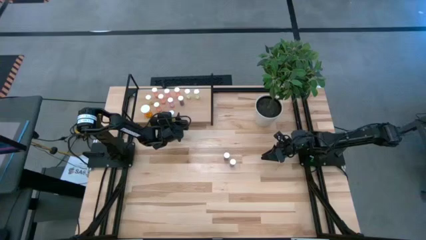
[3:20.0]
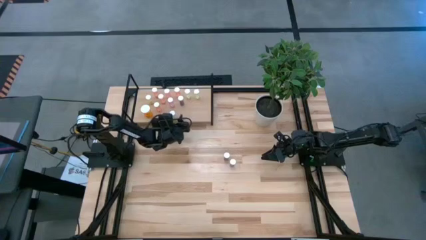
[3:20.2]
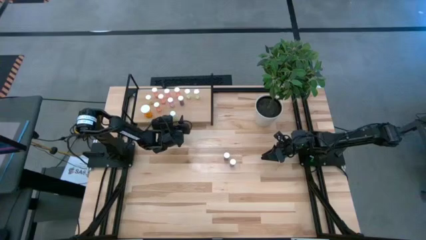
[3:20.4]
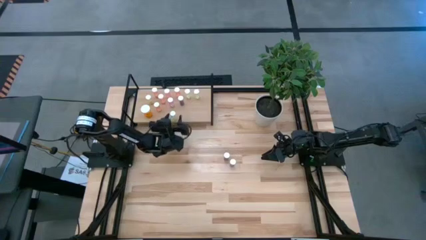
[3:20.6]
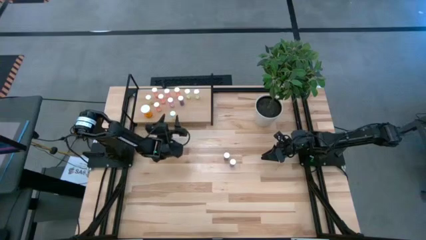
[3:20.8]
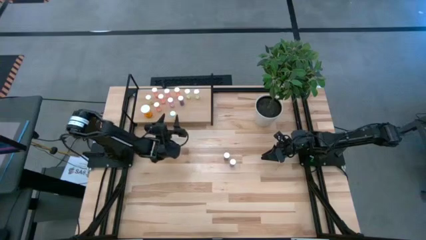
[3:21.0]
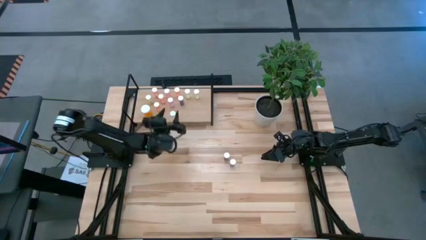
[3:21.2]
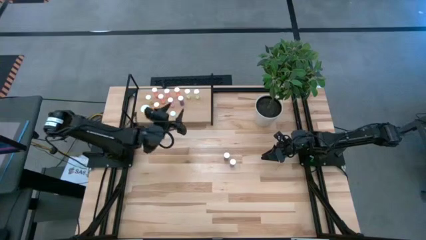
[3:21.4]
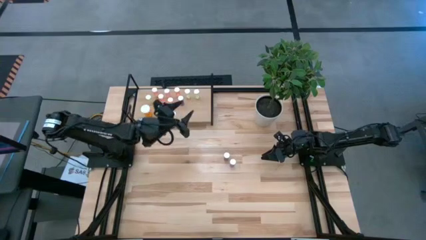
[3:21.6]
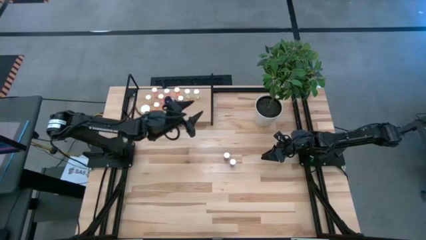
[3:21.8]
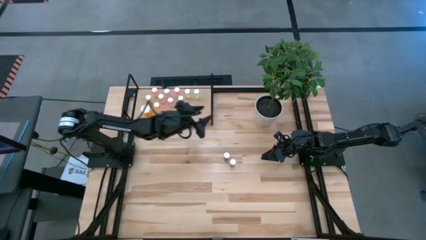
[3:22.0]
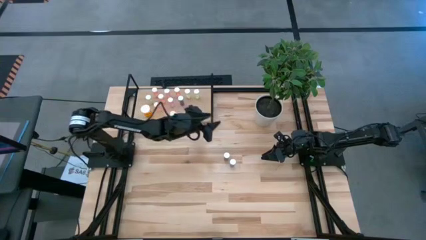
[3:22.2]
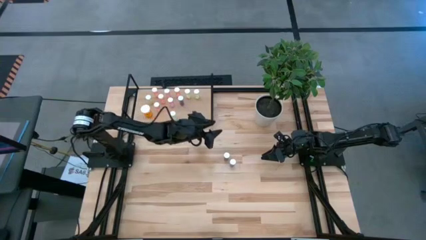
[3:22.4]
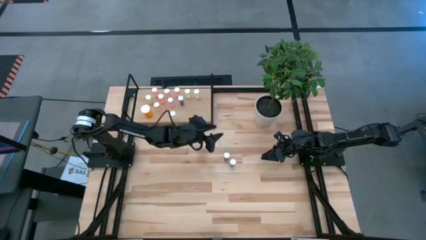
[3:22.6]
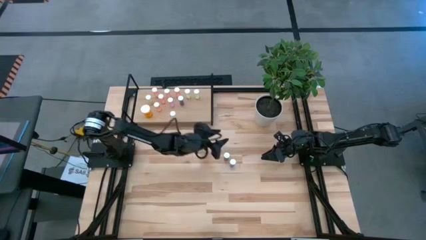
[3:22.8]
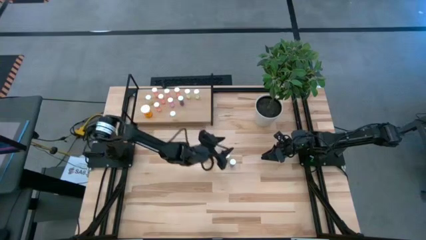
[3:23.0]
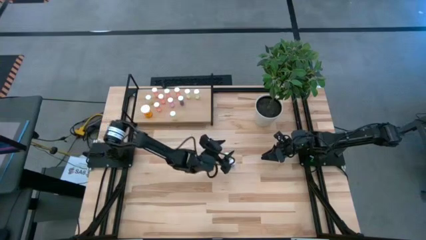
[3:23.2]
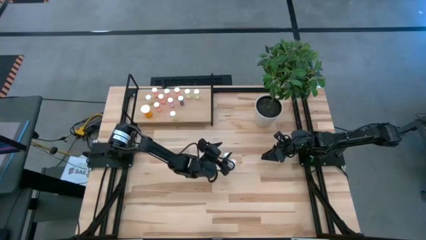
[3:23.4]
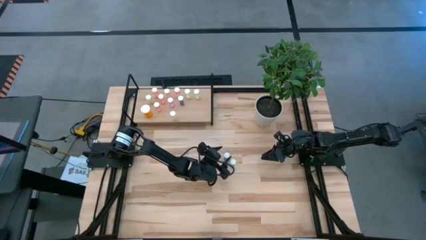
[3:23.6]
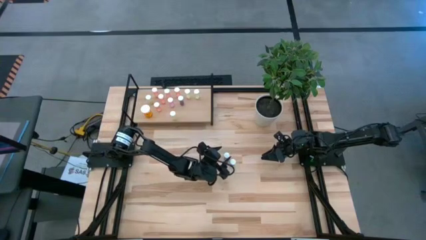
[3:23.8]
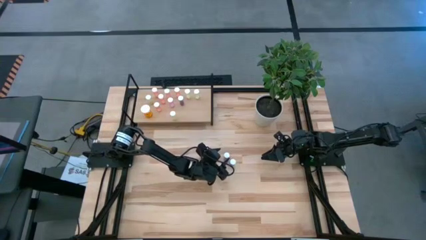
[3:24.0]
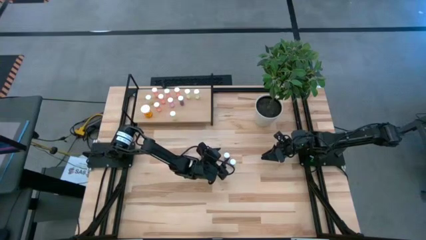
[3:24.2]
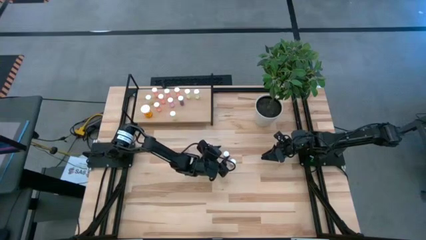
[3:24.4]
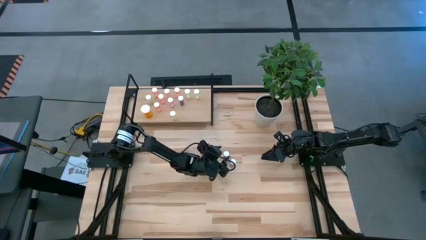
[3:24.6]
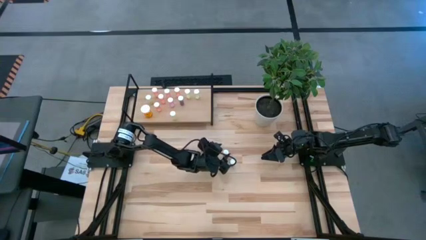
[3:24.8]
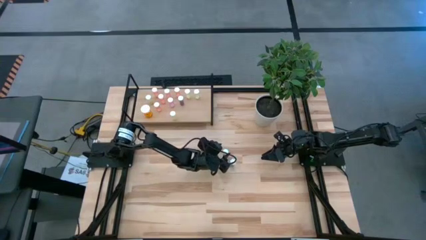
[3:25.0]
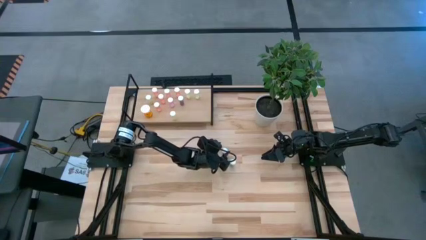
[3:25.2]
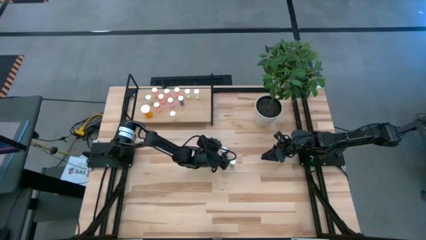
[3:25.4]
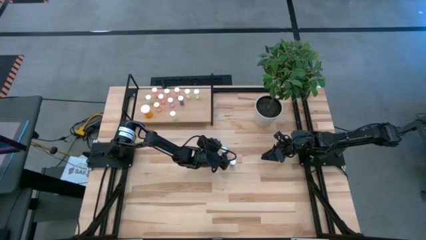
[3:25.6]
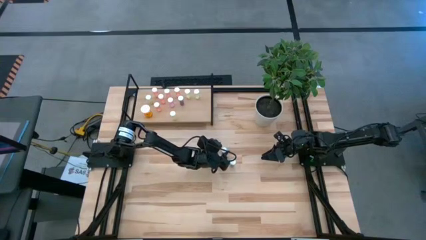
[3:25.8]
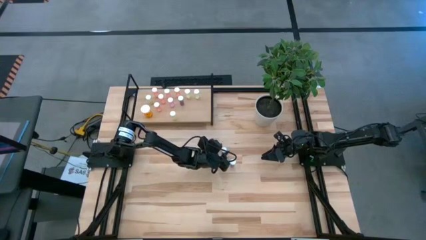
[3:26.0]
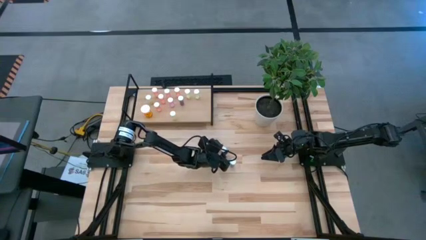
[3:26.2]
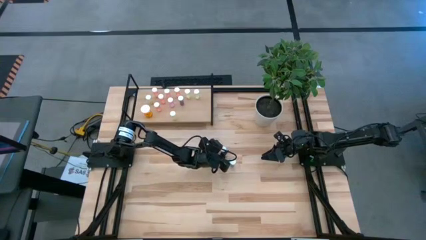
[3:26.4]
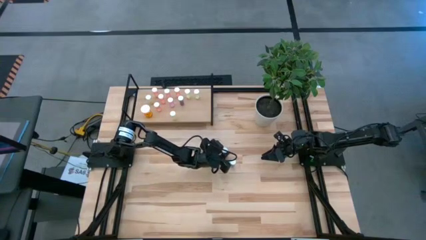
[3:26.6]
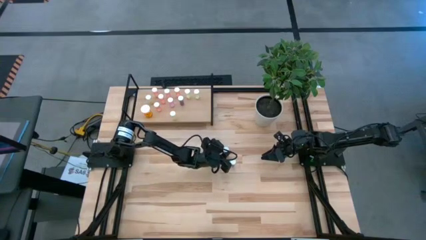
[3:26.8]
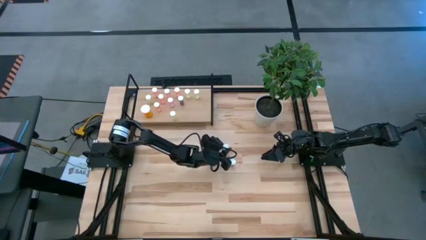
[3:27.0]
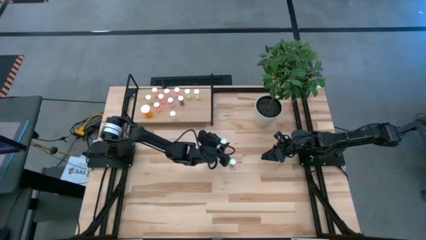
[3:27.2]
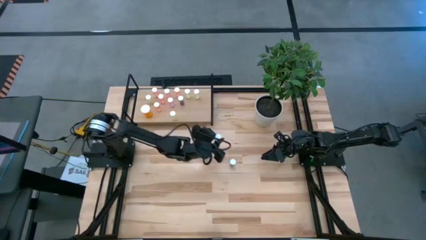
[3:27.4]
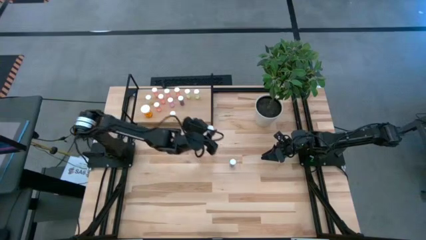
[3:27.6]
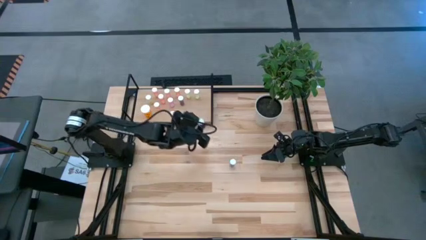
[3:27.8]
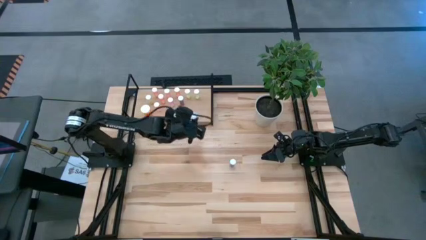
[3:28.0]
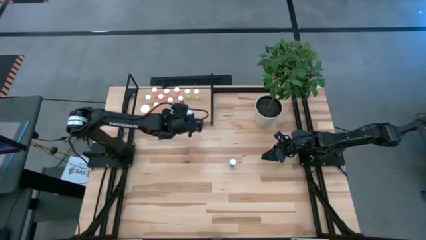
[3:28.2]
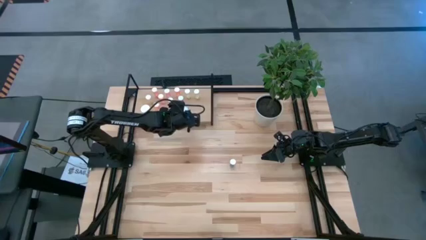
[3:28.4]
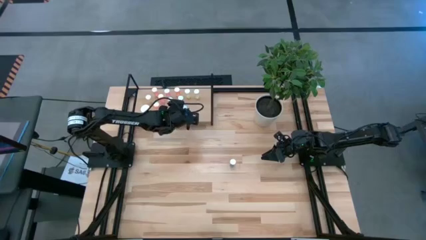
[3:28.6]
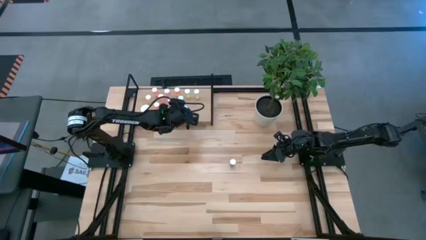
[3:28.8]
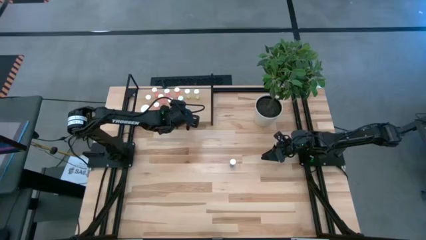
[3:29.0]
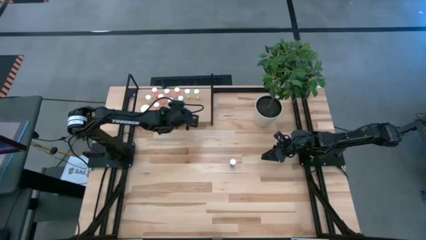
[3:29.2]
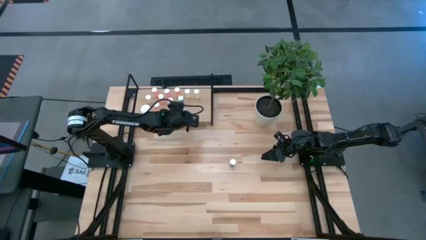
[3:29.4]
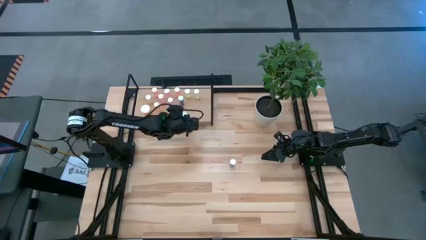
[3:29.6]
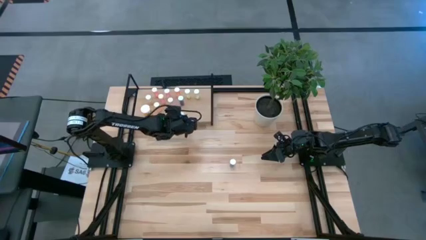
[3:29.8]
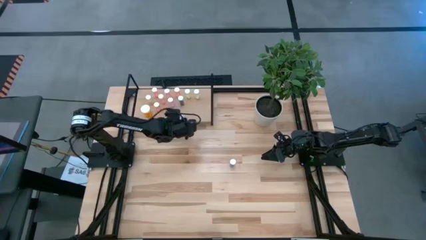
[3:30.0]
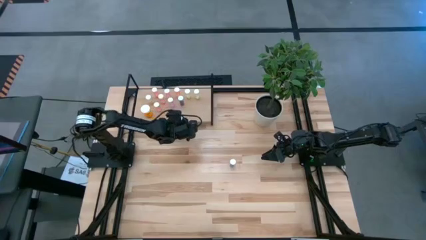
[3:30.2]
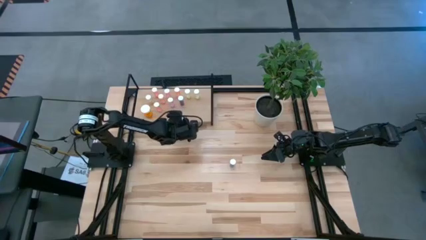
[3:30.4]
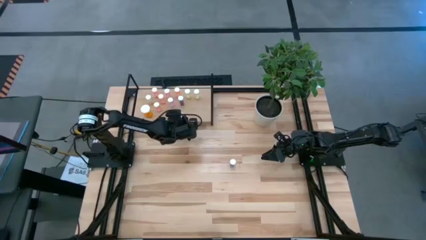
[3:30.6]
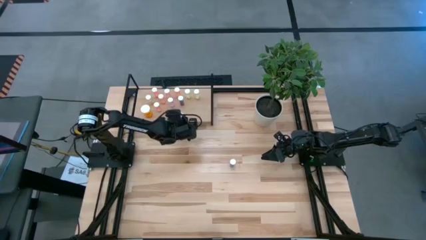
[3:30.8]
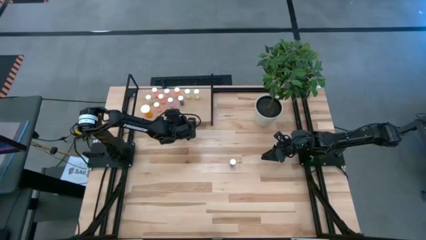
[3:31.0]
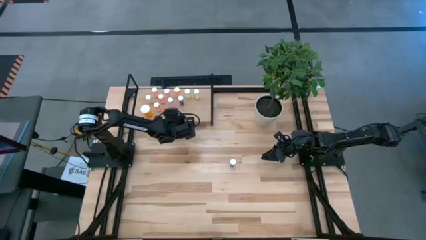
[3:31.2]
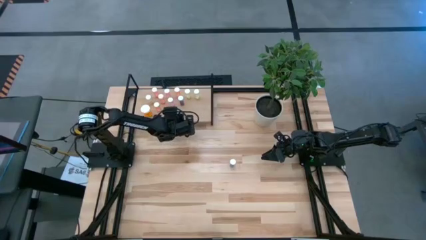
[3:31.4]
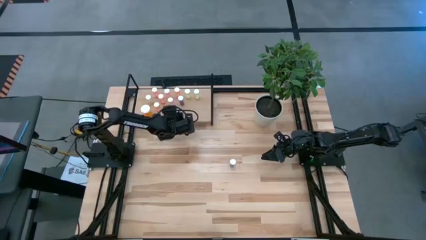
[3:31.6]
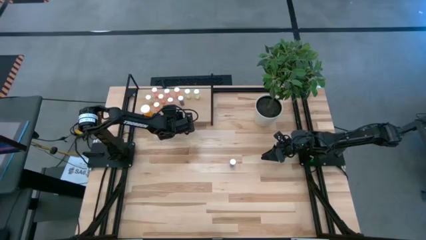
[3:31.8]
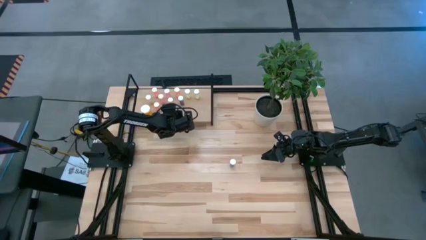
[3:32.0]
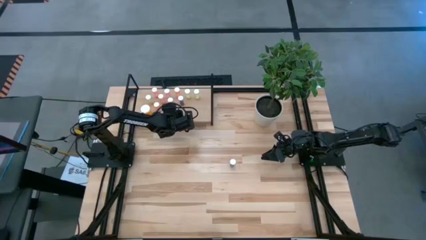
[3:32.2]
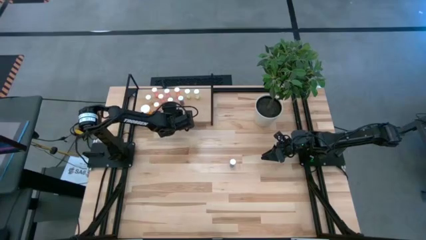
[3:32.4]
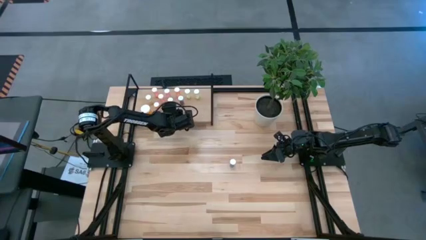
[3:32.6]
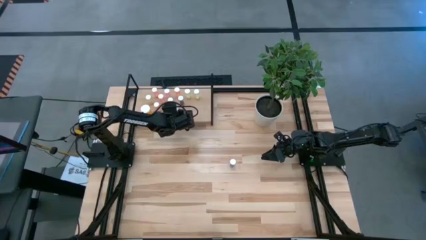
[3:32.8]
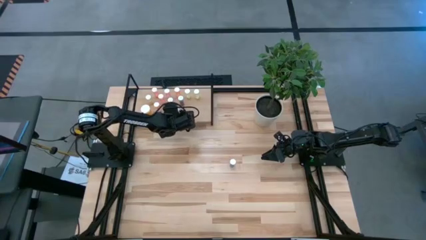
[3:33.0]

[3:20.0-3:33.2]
Task: Pick and place medicine bottles onto shelf by color
Put the blue pill bottle on the shelf
